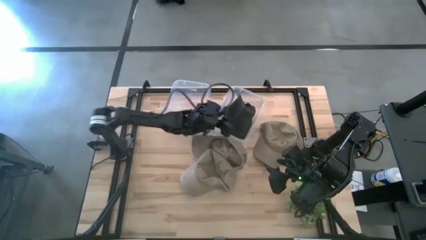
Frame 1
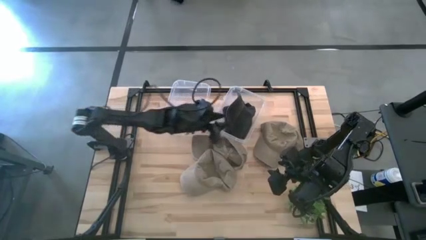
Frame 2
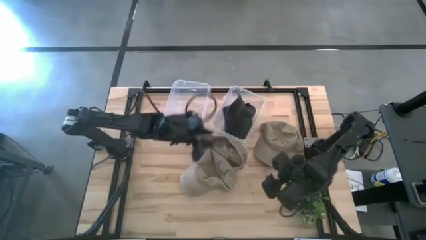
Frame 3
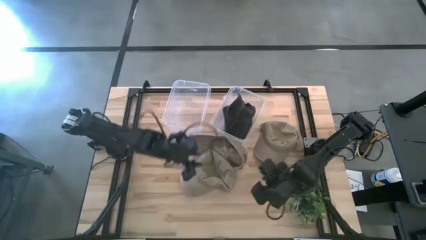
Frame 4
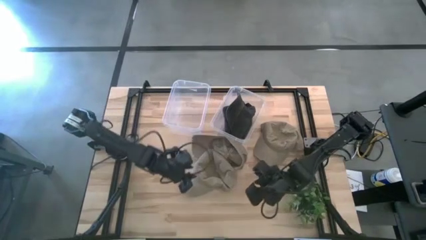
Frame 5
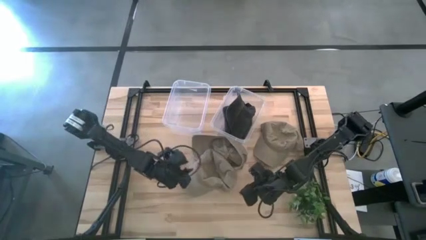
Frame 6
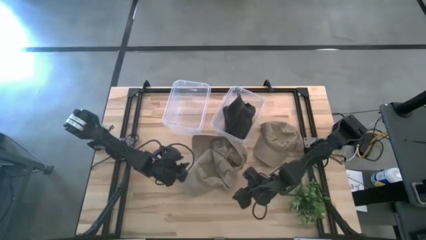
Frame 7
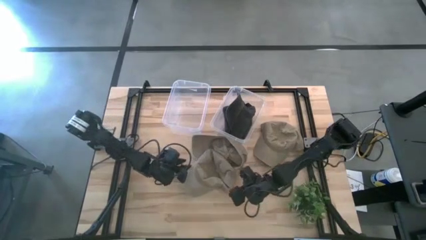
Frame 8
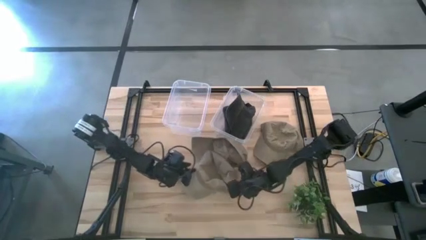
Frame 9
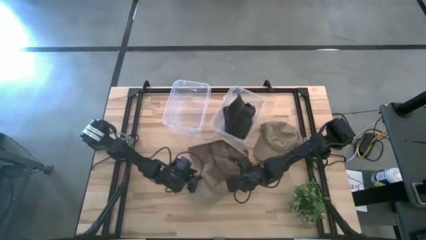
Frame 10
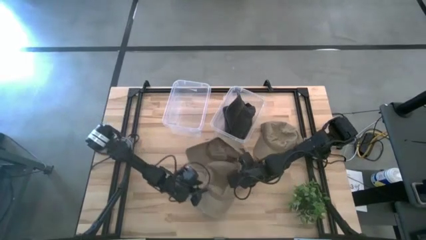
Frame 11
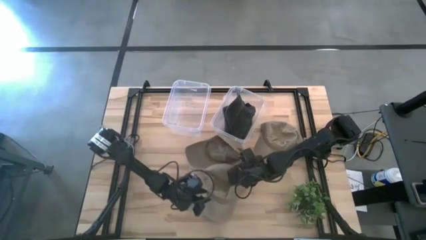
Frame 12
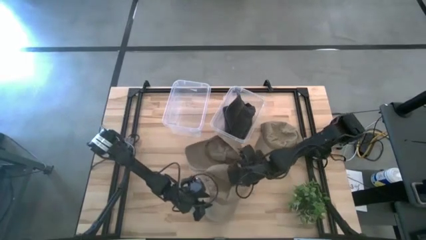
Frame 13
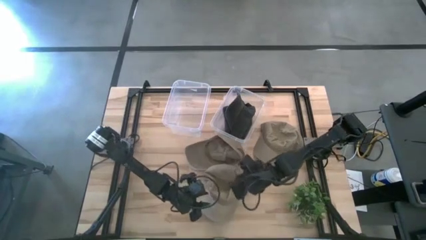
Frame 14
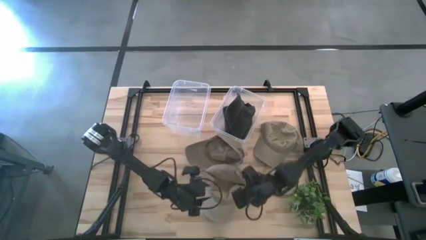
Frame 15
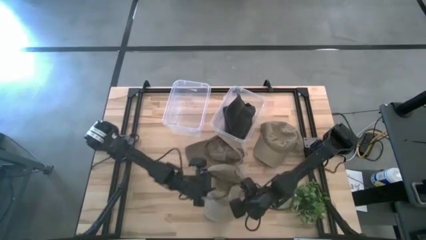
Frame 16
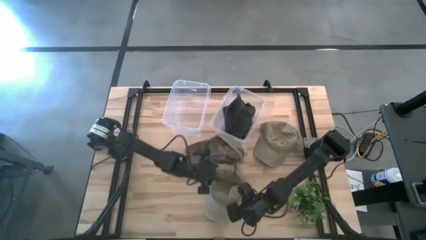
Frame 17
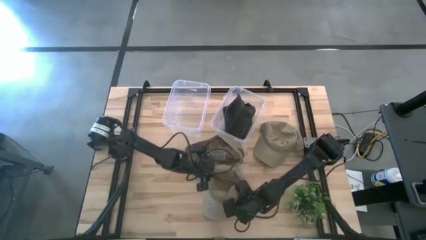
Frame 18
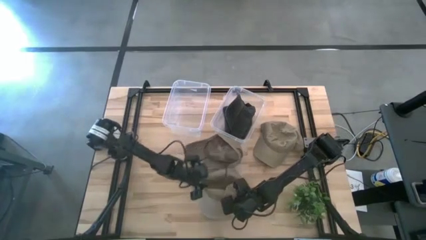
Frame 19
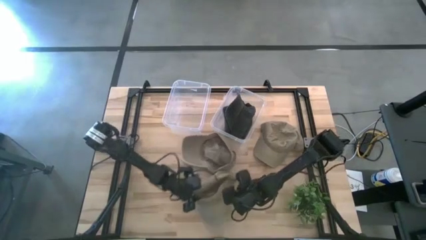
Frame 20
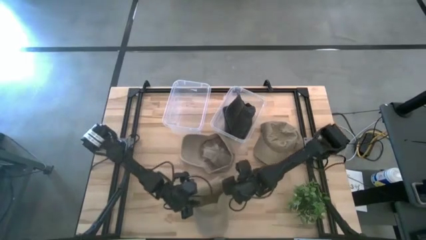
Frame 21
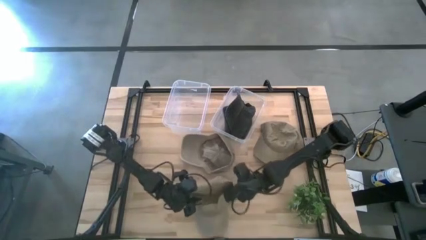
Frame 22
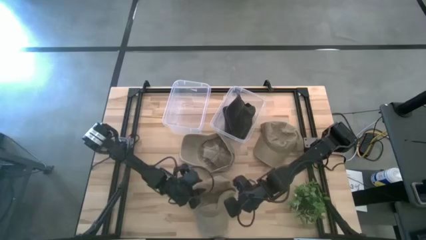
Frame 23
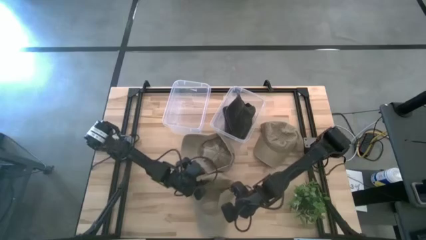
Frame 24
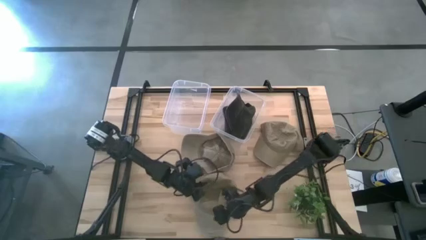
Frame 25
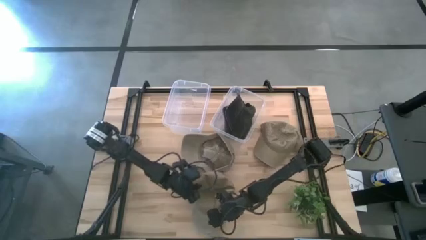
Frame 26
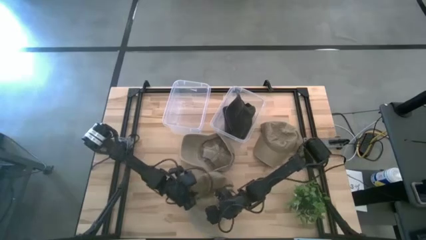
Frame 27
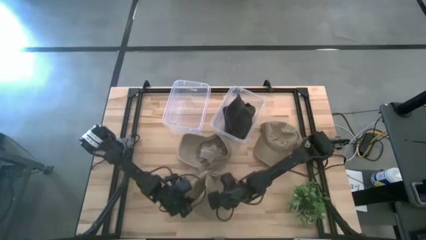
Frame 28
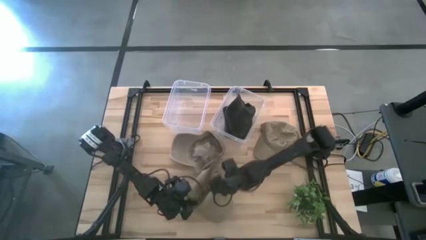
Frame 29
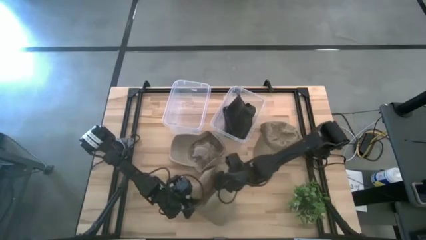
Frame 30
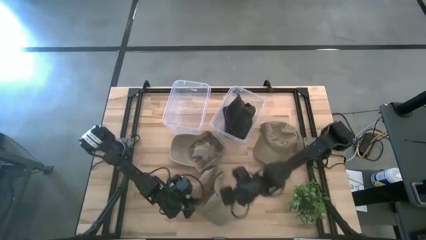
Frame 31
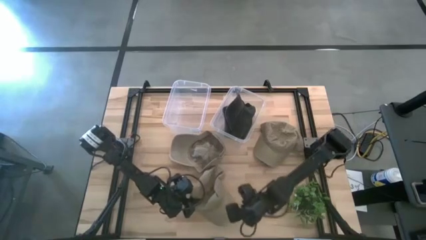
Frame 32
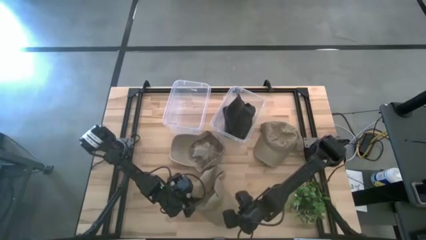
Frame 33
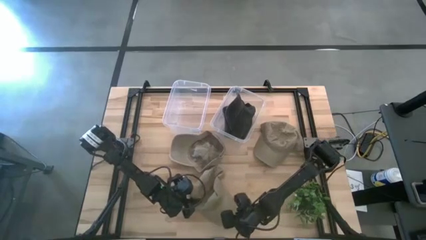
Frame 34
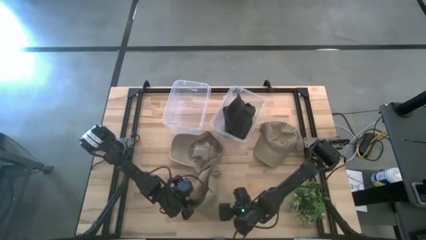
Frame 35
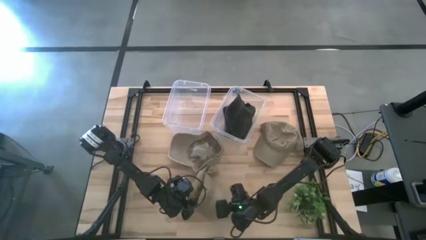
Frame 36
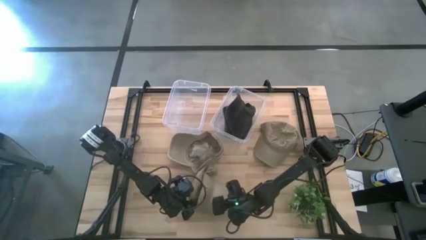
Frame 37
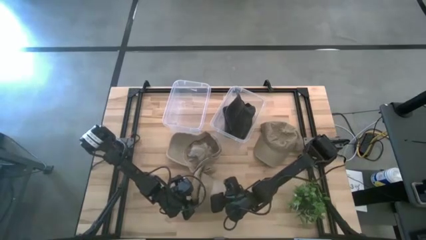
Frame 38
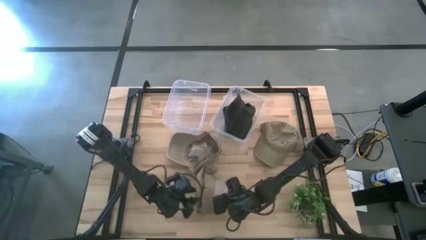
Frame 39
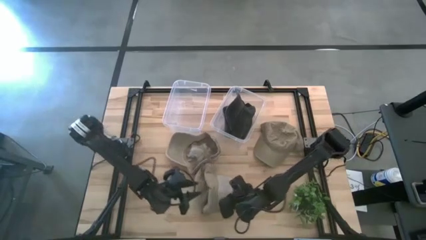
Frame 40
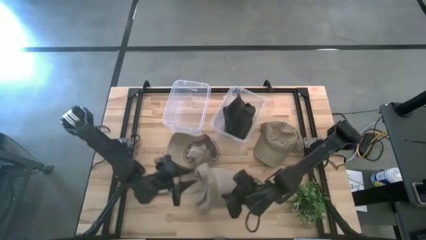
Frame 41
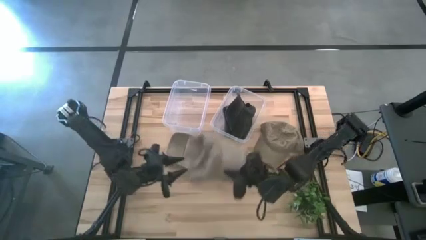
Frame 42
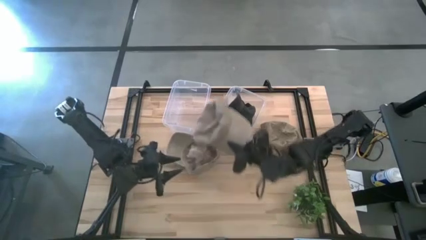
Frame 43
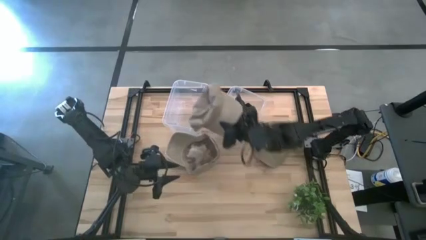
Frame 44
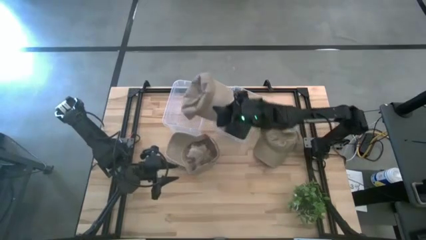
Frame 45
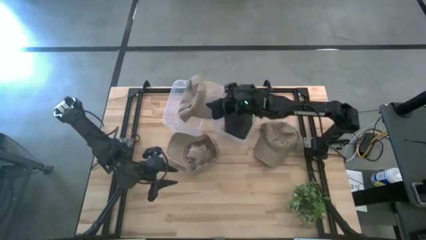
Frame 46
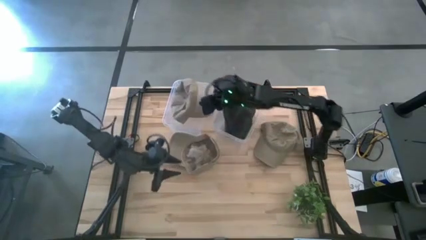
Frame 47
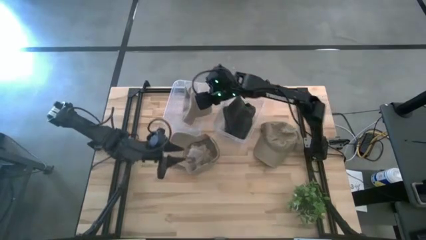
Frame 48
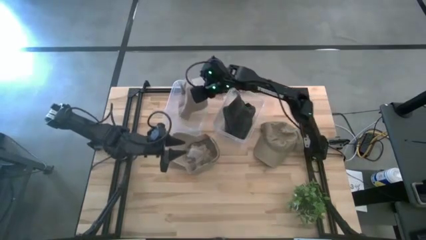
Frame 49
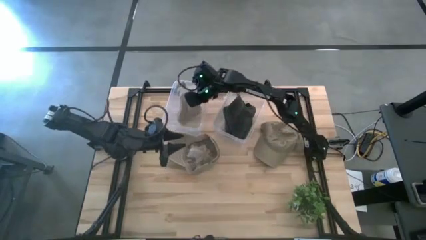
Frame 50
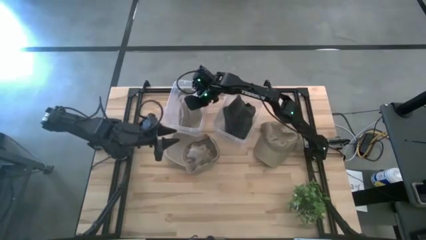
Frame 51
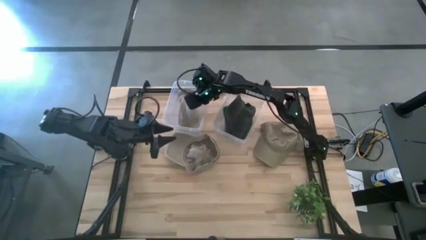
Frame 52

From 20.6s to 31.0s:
Task: Pick & Place hat
Put the bottom brown cap into the left transparent bin

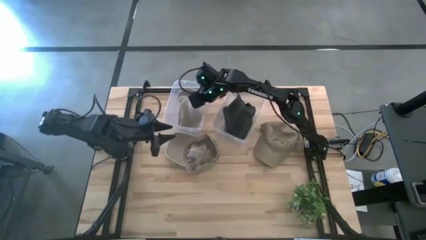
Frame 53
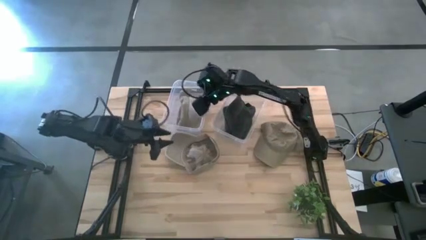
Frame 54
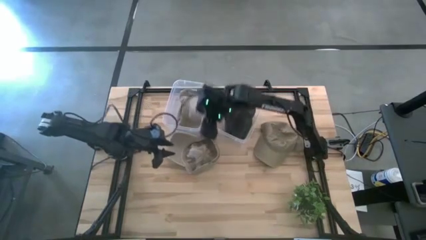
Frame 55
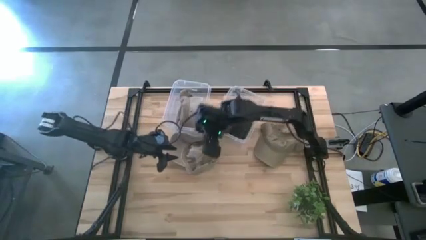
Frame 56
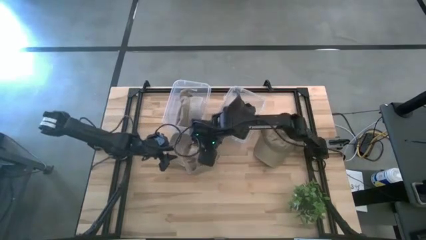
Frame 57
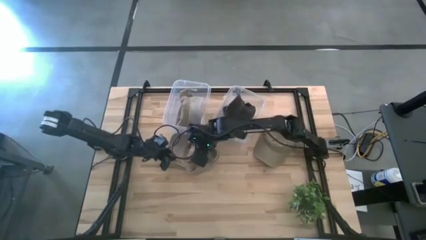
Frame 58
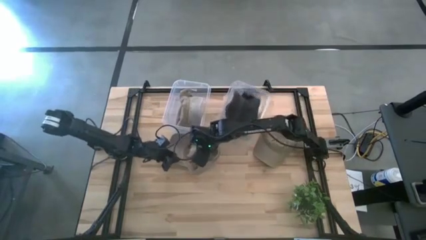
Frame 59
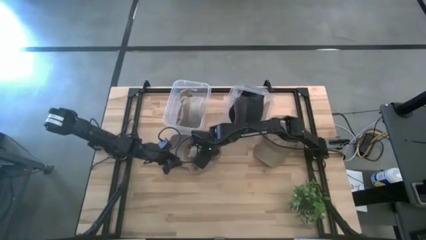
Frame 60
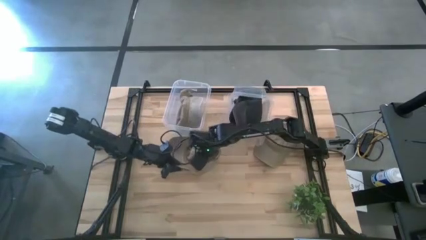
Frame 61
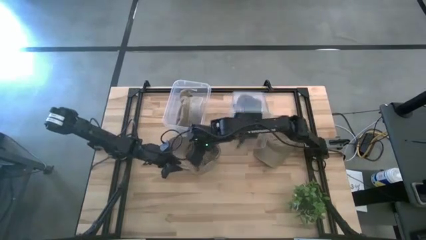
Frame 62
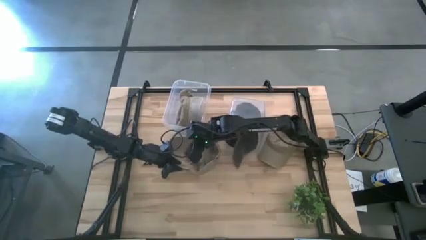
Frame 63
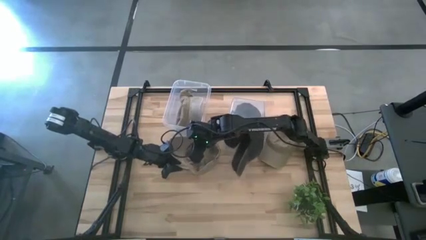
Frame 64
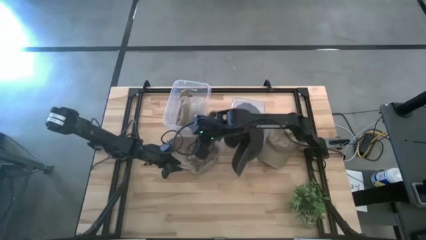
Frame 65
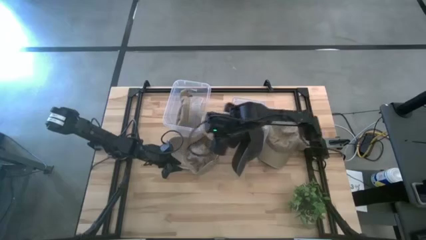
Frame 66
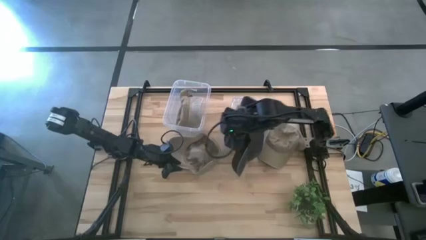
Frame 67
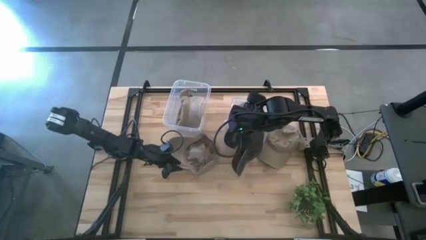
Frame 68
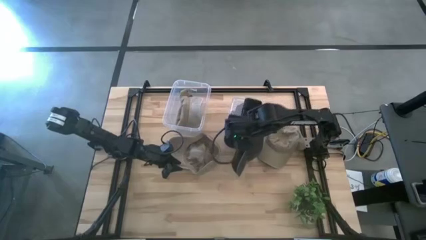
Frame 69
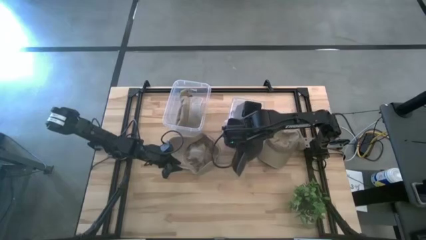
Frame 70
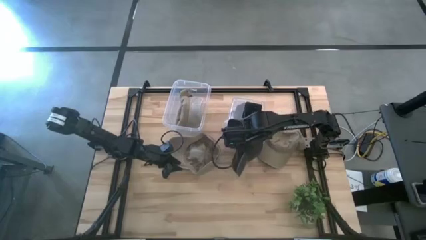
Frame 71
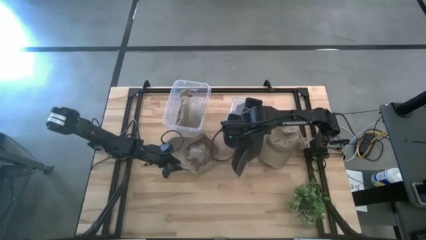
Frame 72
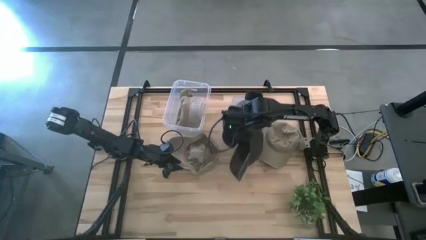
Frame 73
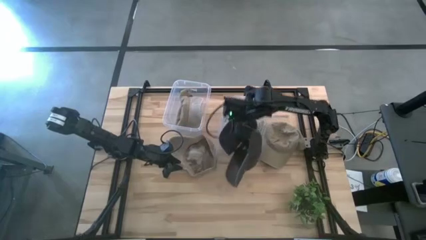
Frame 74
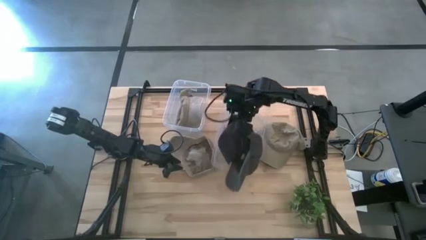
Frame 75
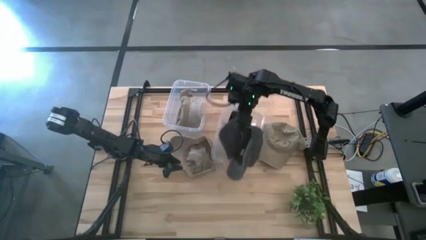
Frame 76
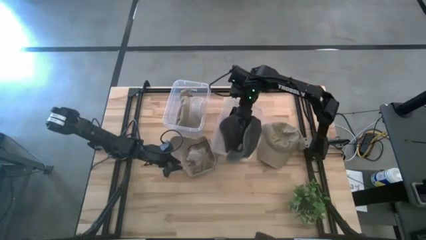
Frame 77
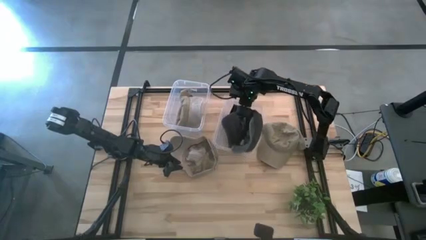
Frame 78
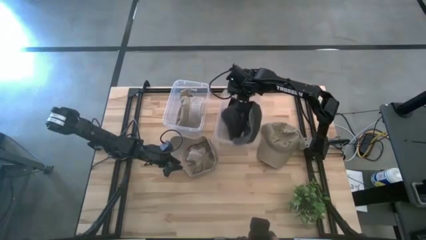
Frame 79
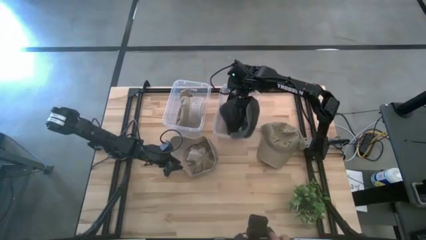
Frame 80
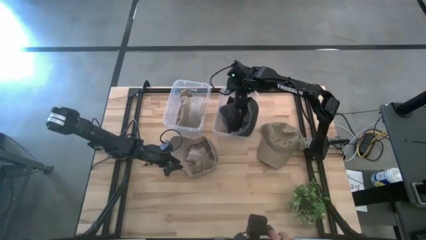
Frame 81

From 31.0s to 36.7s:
Adjust the transparent bin on the table
